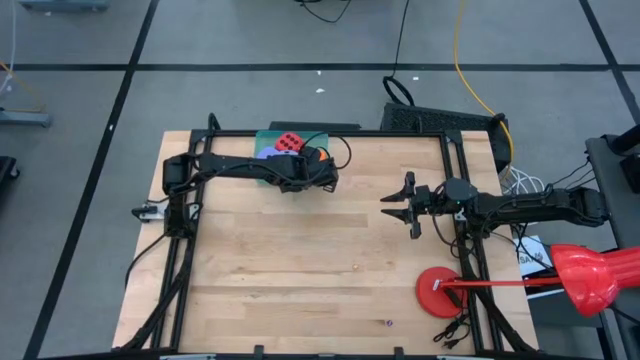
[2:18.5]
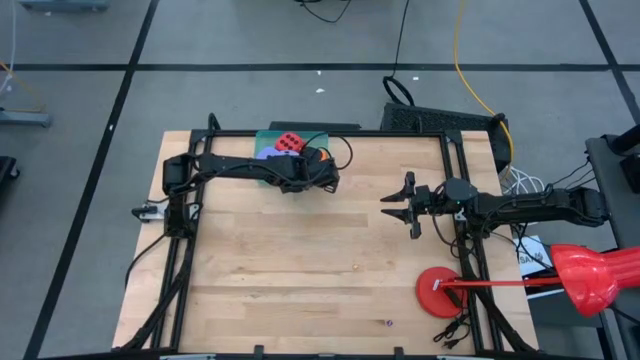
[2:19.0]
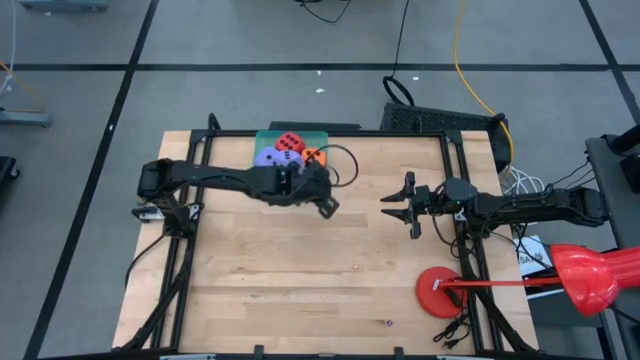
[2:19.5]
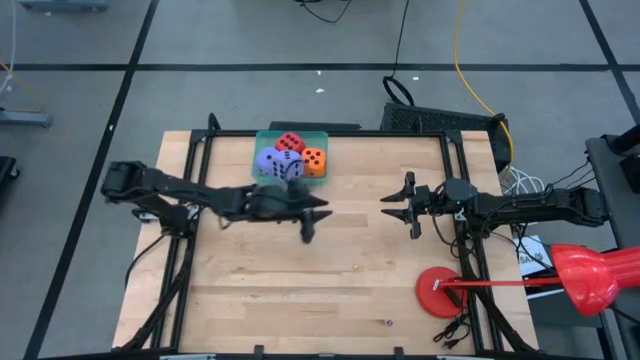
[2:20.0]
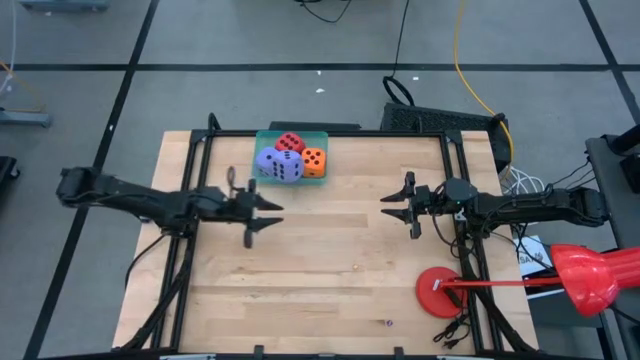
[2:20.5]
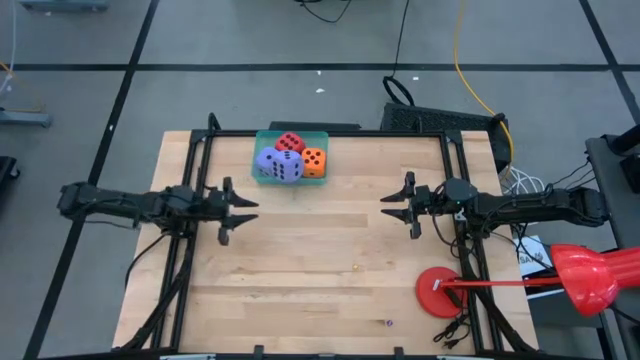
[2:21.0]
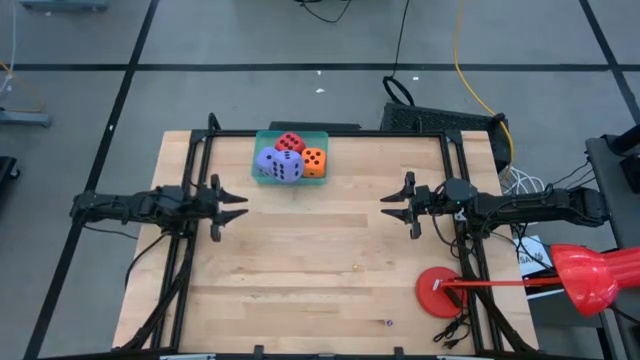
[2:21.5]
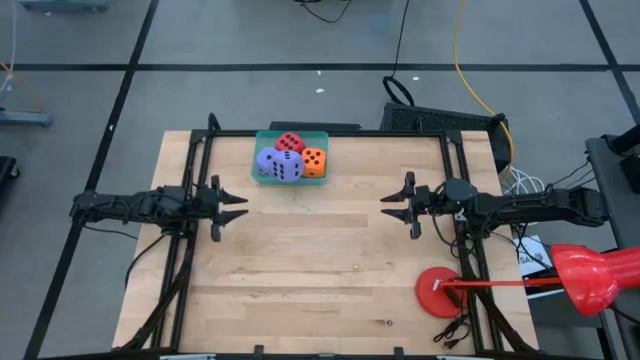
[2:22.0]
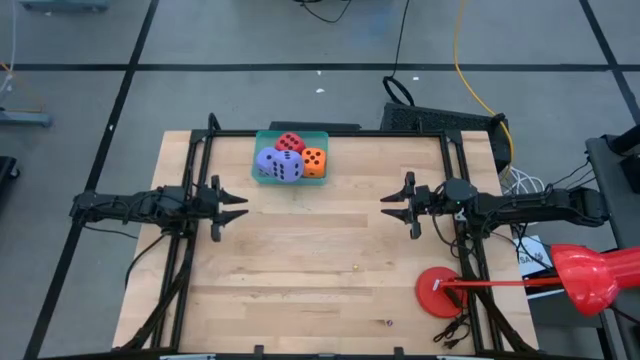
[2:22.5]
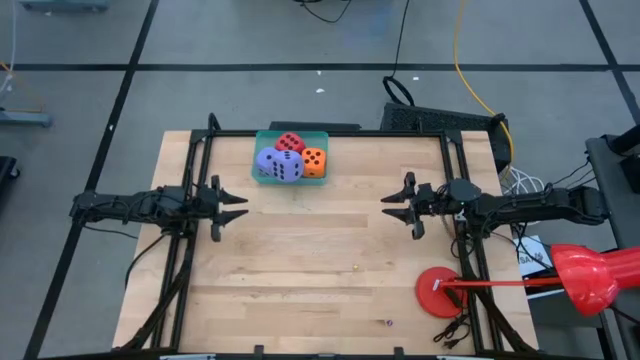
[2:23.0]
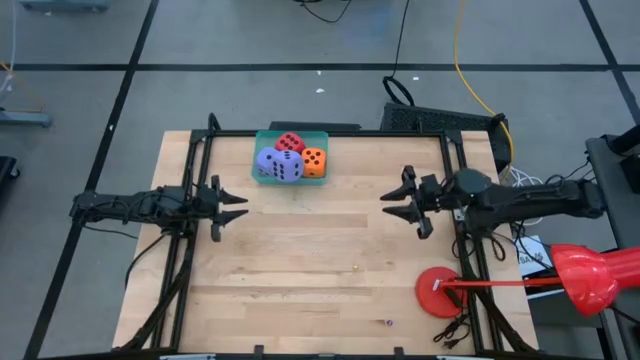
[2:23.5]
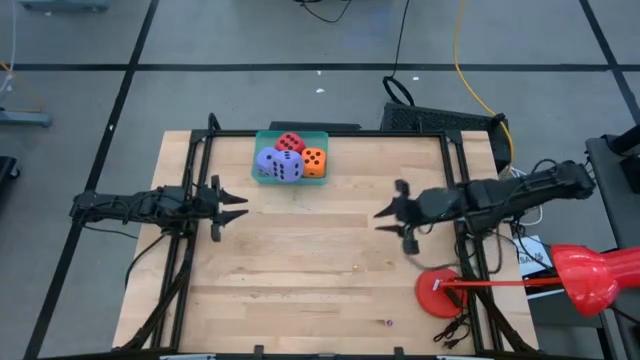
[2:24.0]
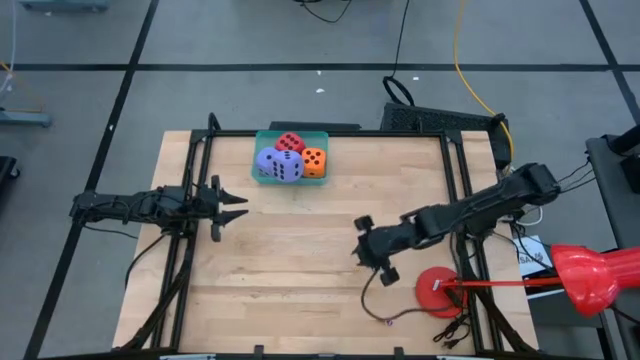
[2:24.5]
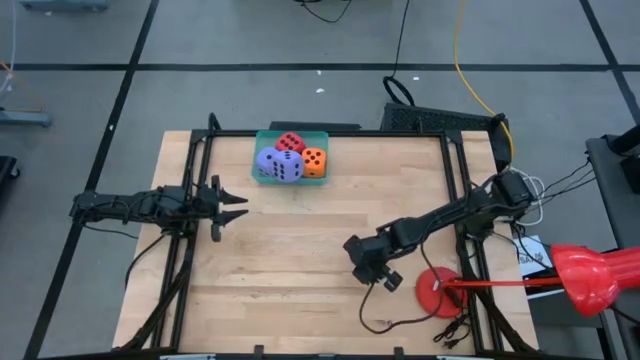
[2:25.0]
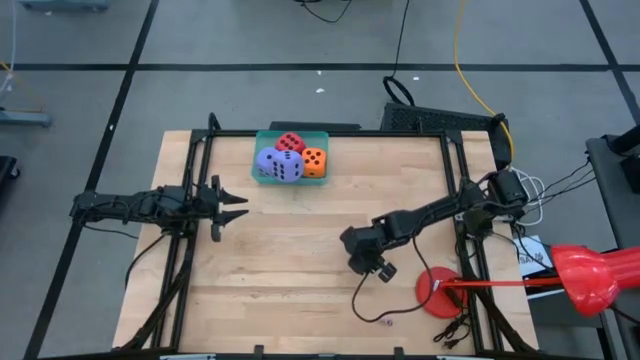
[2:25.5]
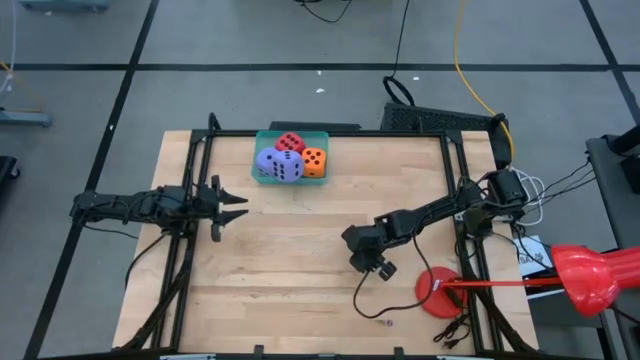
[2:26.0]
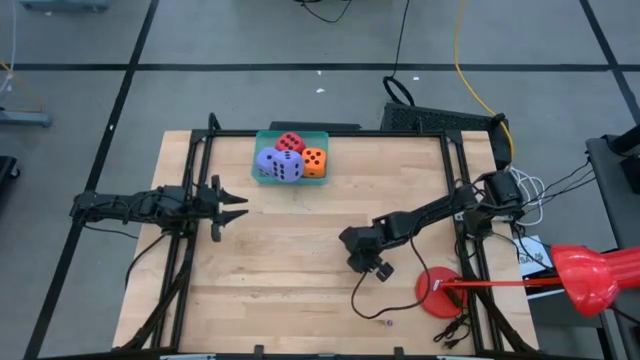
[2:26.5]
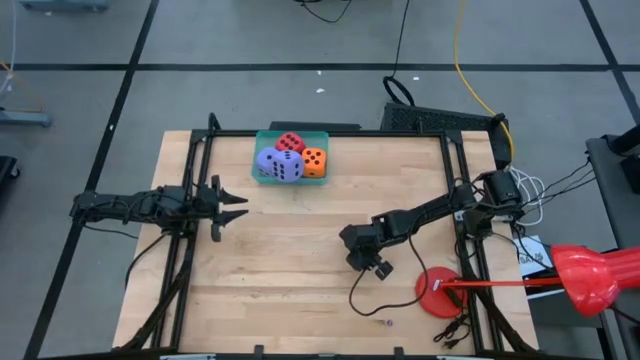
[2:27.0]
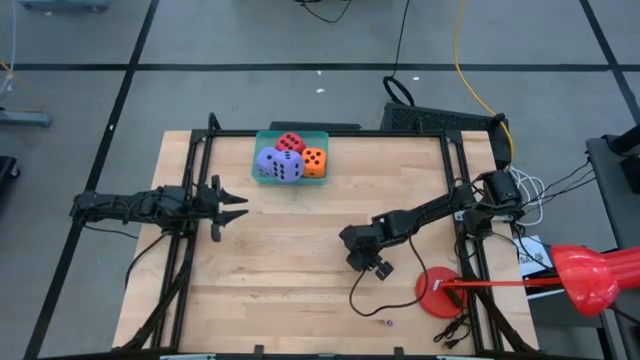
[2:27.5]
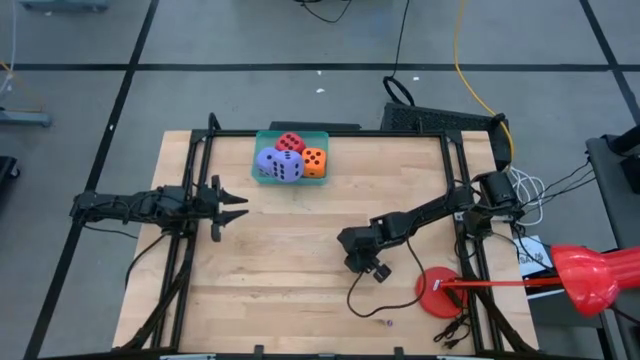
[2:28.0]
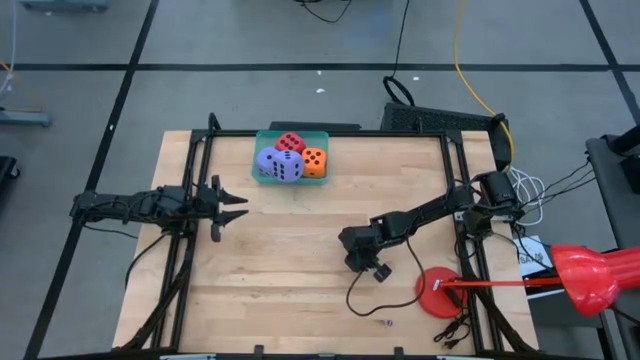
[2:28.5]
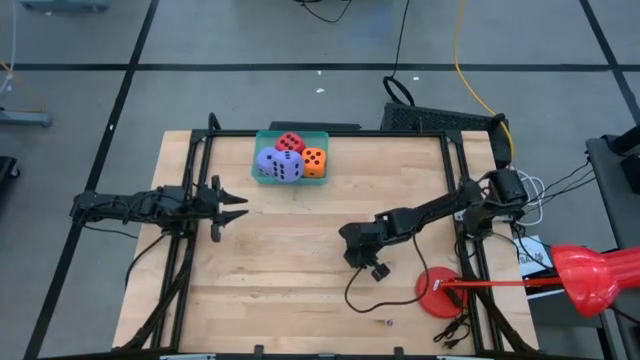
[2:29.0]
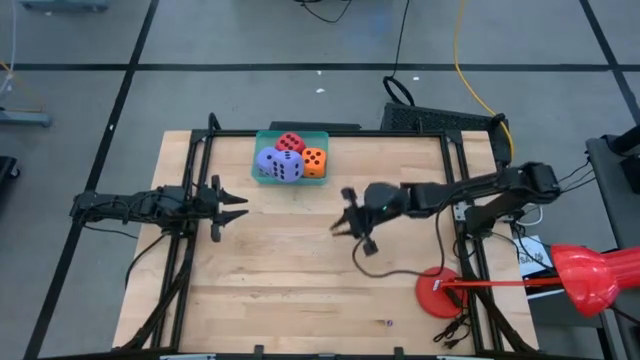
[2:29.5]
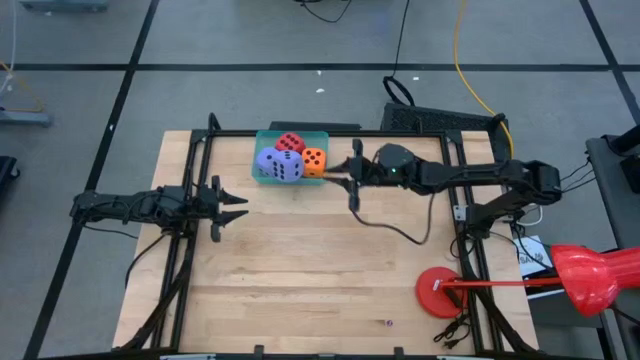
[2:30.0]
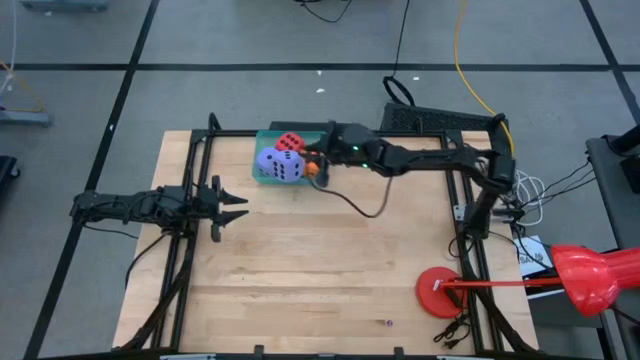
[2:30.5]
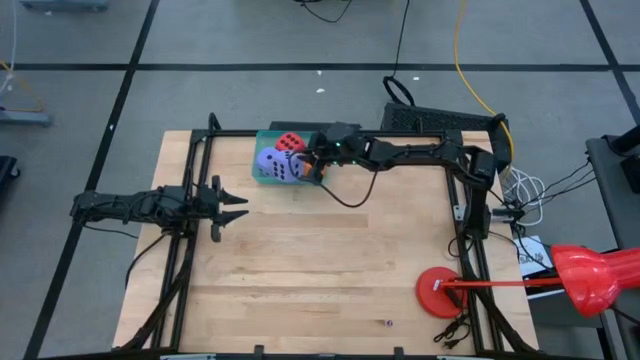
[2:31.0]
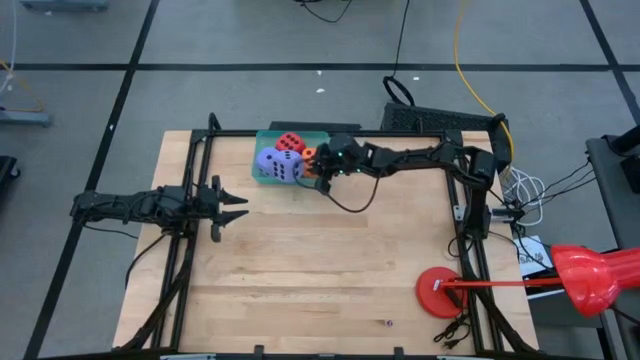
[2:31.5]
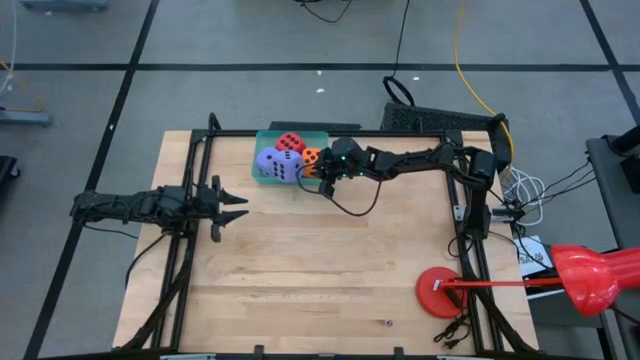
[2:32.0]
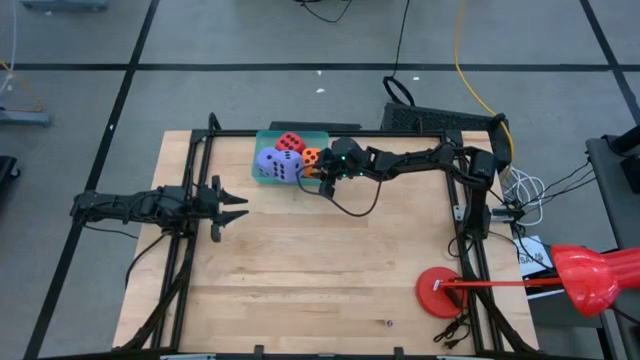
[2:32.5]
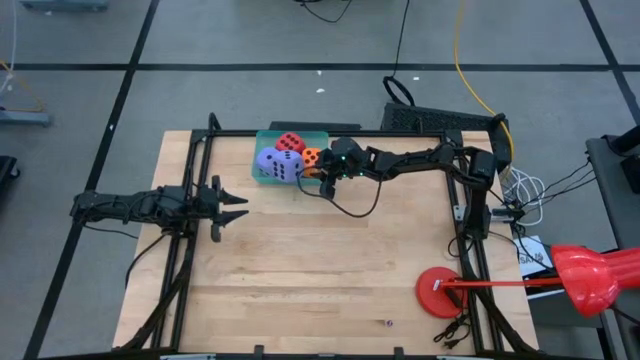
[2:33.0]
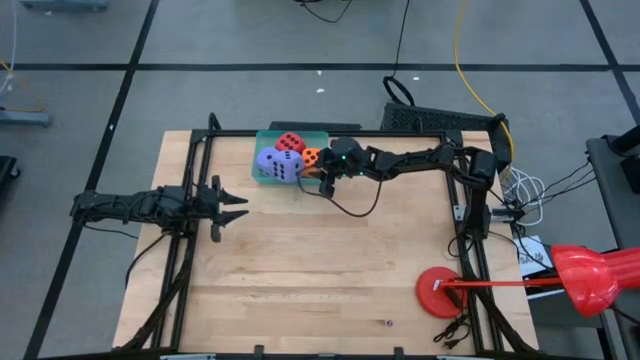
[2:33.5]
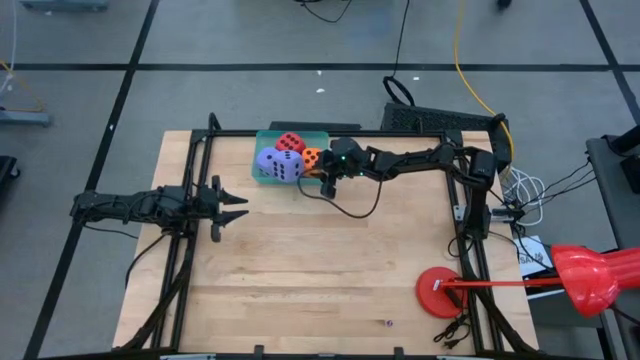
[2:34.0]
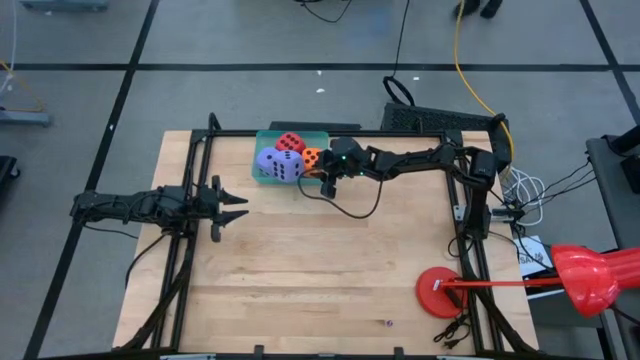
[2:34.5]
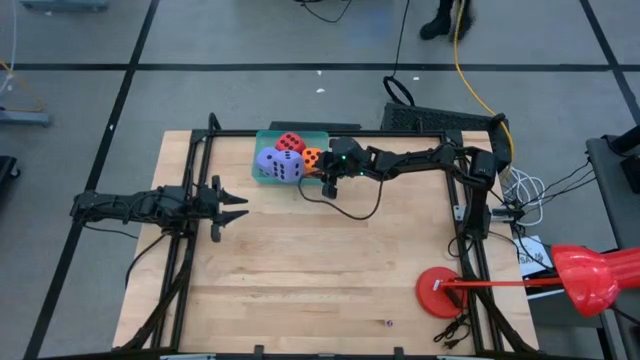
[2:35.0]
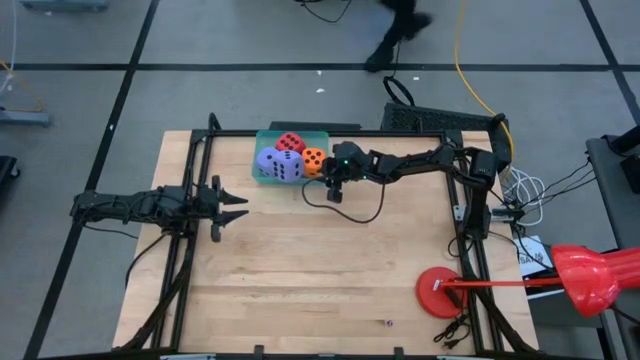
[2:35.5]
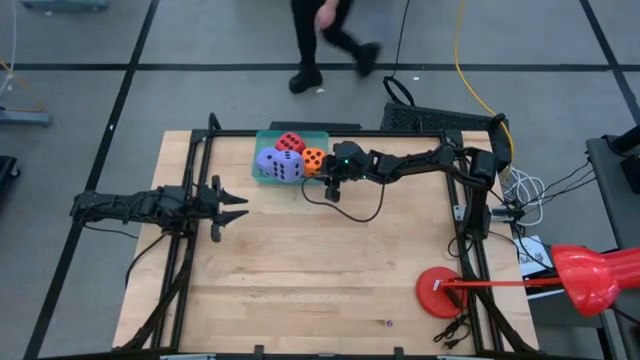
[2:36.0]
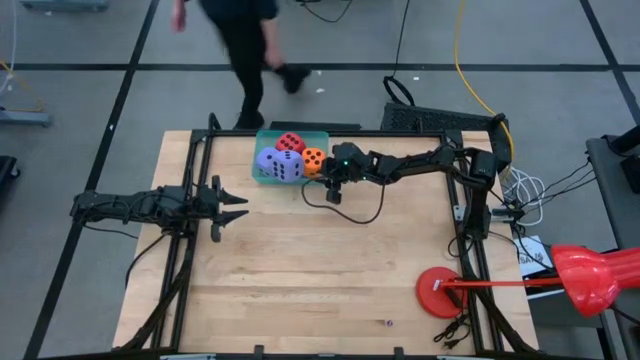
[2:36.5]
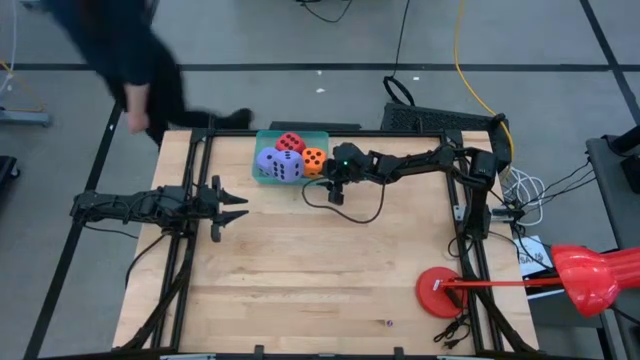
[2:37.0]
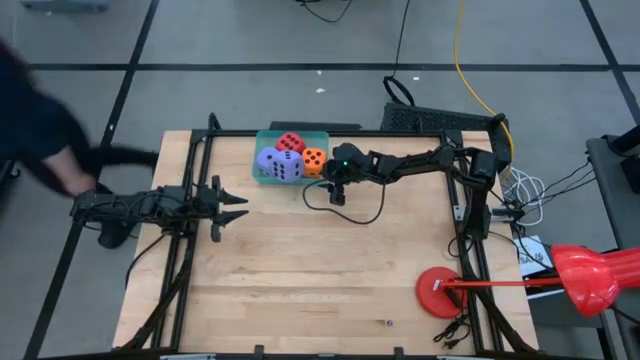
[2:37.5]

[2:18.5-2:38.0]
Task: Pick & Place Dice
Put the small yellow dice into the green bin

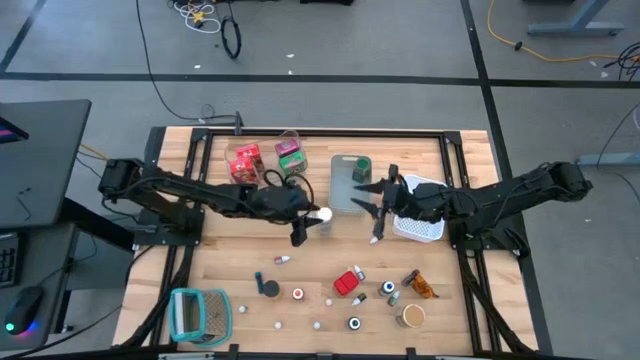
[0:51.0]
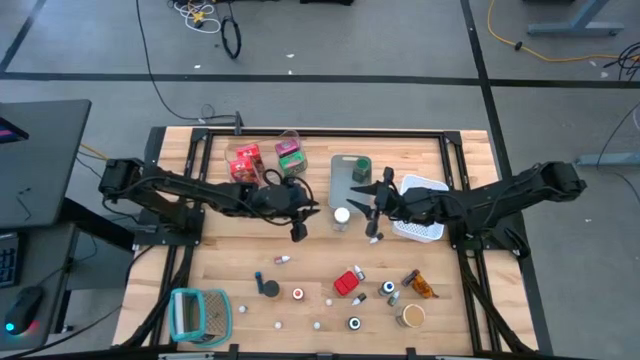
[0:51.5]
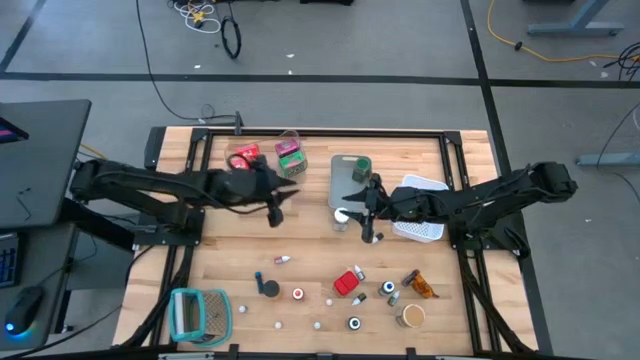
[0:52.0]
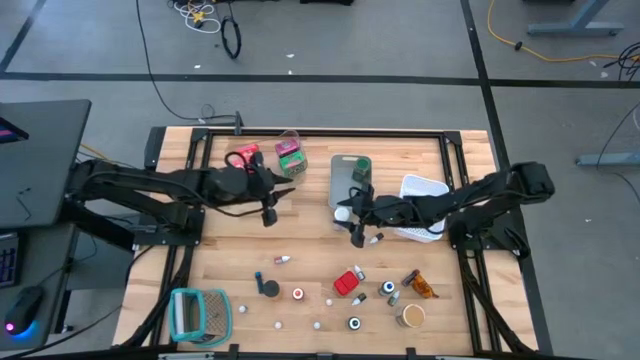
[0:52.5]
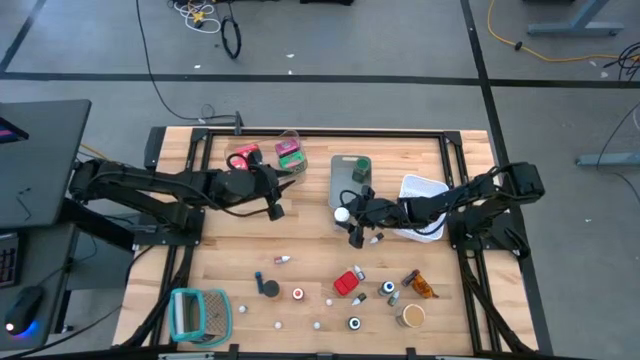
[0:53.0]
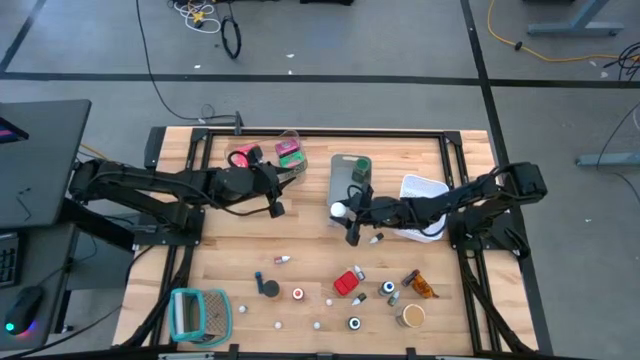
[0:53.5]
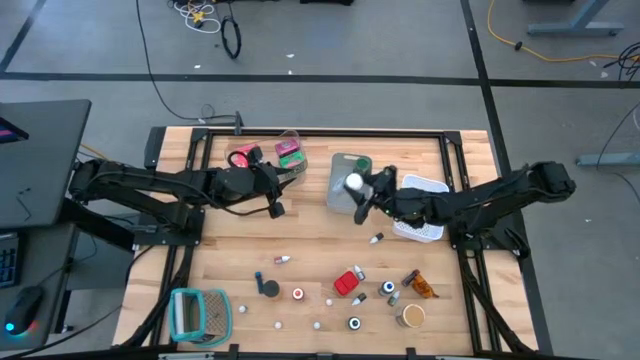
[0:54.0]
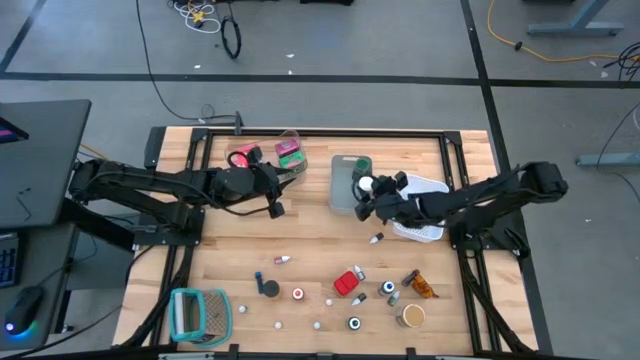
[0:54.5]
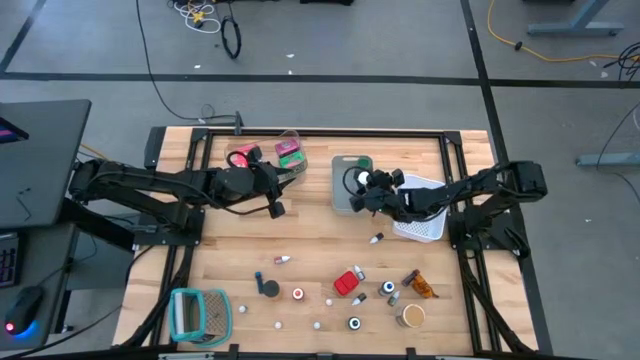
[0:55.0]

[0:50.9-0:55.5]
Task: Pick & Place Kitchen Items
Put the white spice bottle into the gray bin
